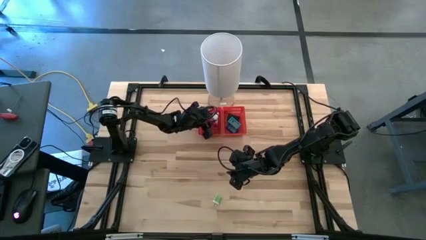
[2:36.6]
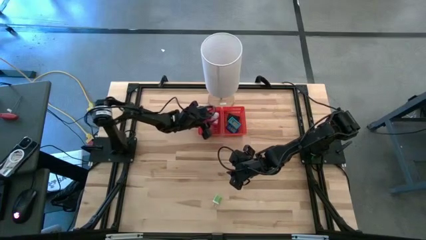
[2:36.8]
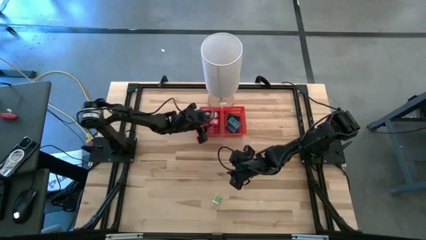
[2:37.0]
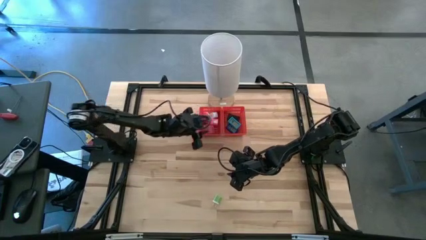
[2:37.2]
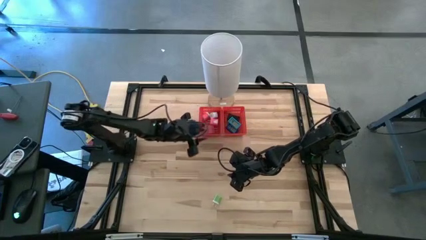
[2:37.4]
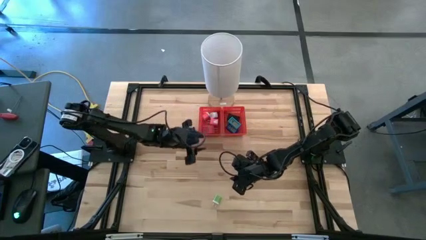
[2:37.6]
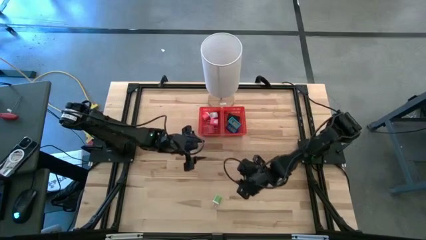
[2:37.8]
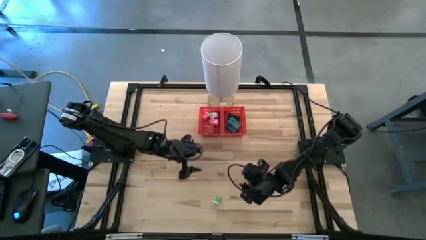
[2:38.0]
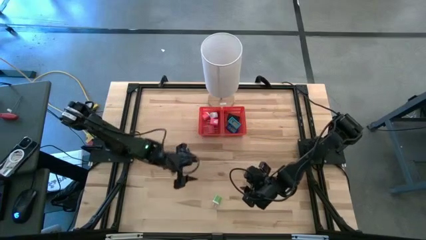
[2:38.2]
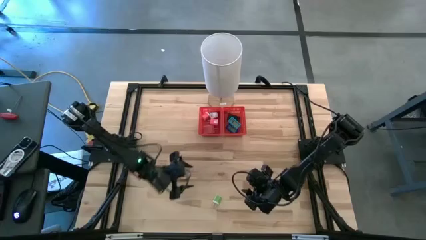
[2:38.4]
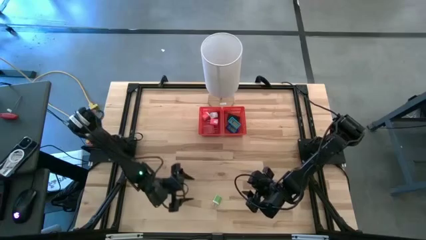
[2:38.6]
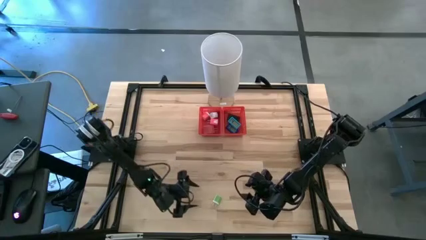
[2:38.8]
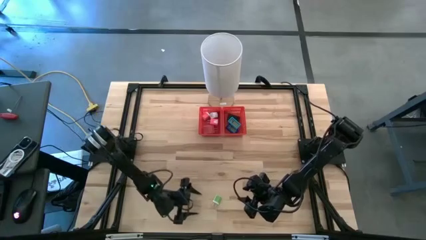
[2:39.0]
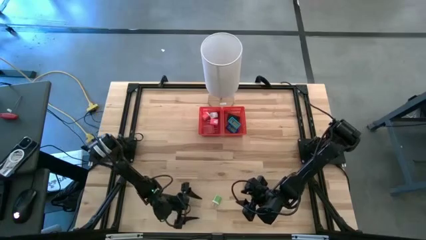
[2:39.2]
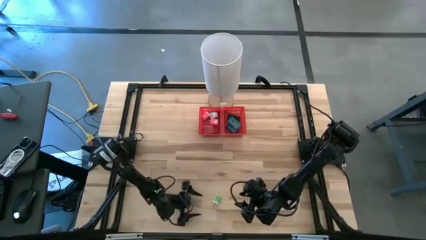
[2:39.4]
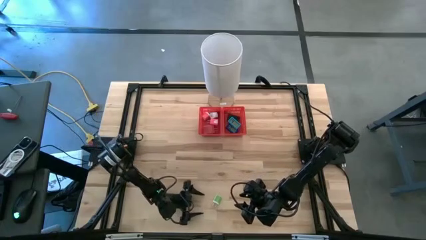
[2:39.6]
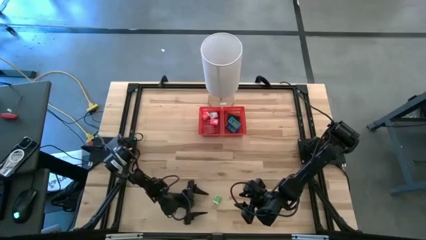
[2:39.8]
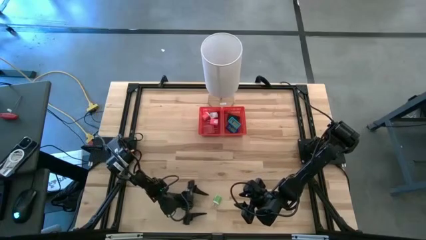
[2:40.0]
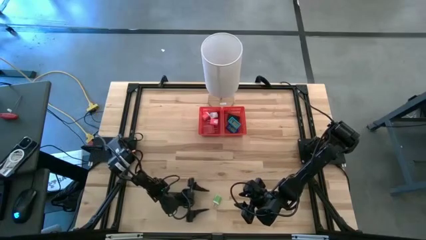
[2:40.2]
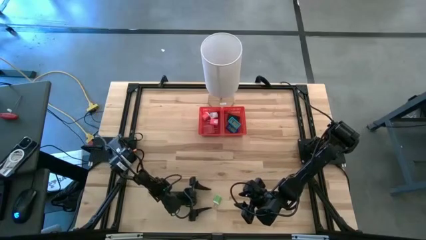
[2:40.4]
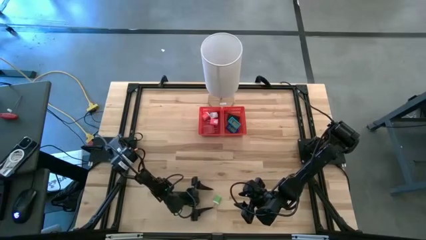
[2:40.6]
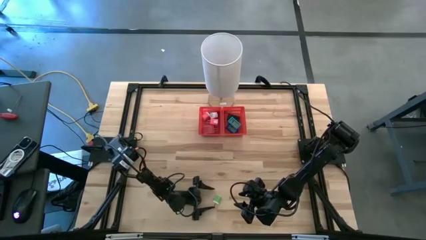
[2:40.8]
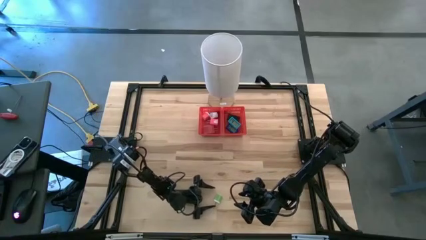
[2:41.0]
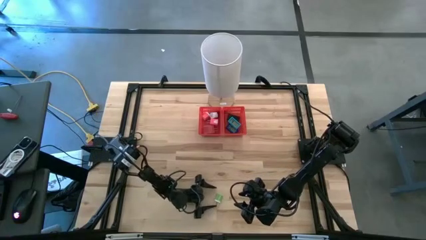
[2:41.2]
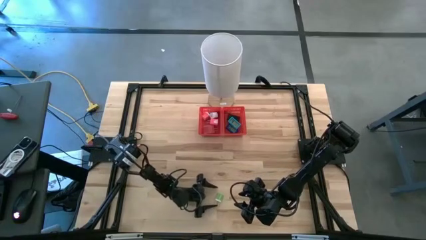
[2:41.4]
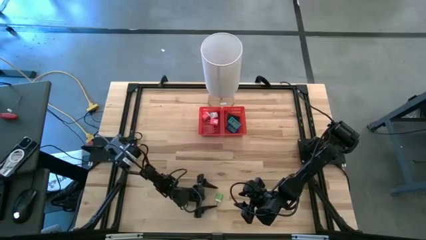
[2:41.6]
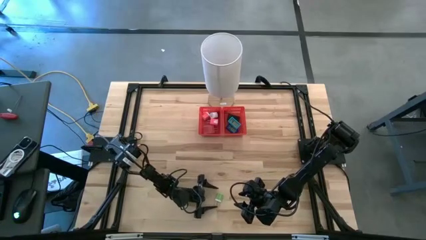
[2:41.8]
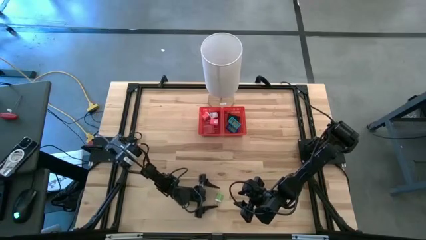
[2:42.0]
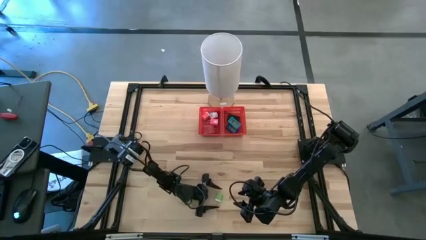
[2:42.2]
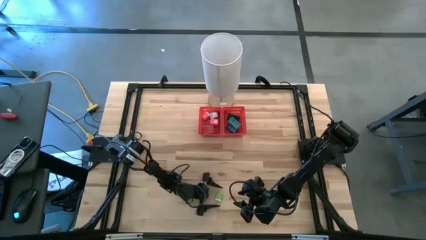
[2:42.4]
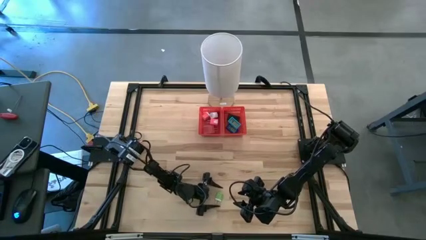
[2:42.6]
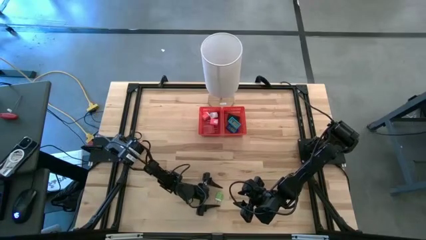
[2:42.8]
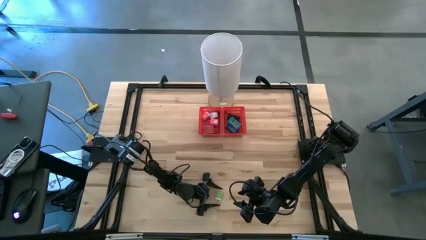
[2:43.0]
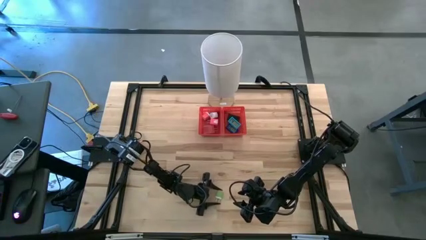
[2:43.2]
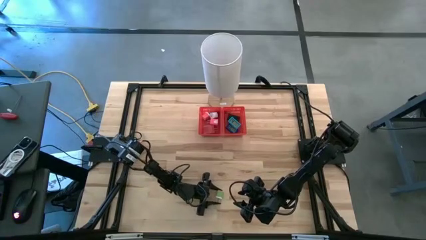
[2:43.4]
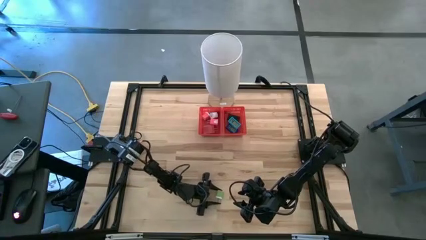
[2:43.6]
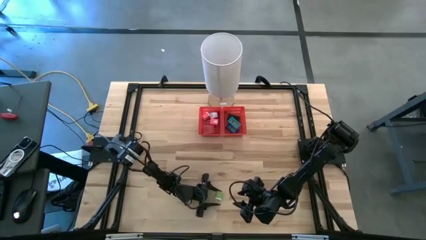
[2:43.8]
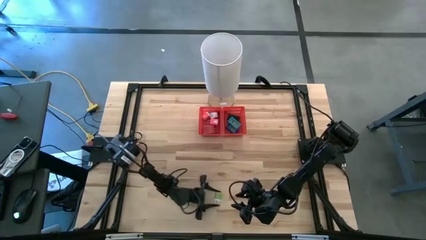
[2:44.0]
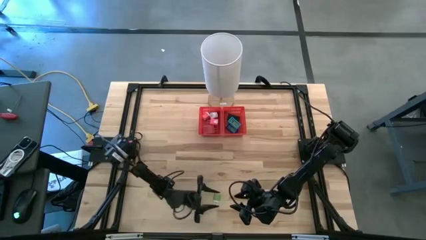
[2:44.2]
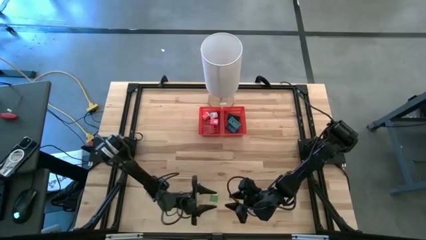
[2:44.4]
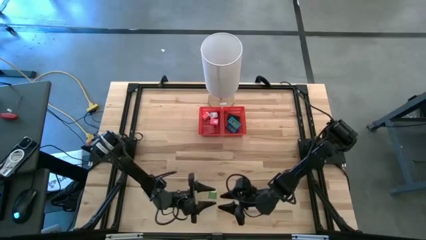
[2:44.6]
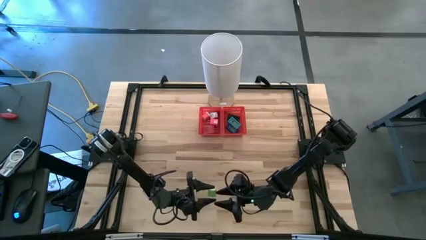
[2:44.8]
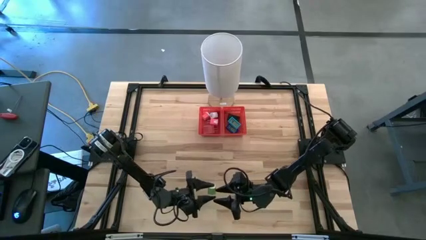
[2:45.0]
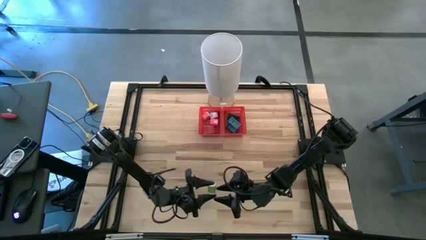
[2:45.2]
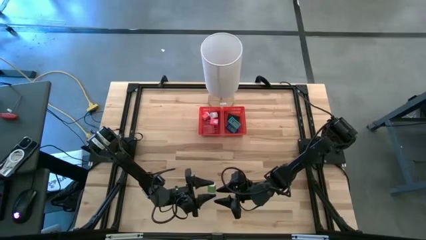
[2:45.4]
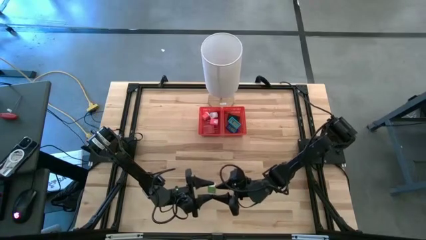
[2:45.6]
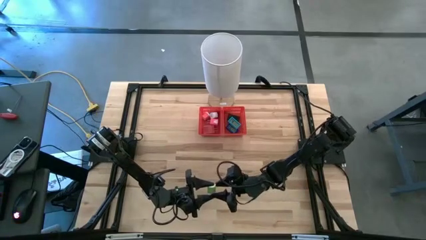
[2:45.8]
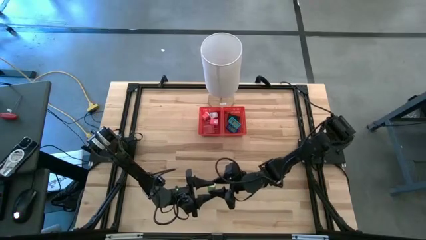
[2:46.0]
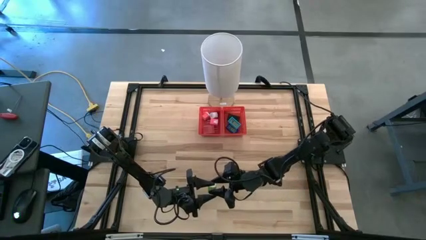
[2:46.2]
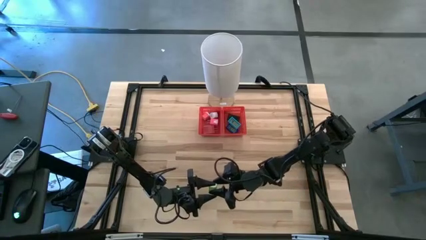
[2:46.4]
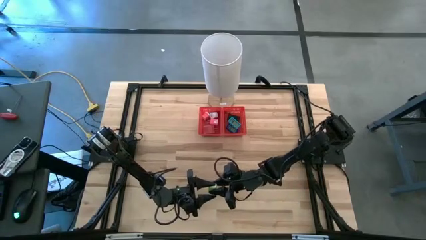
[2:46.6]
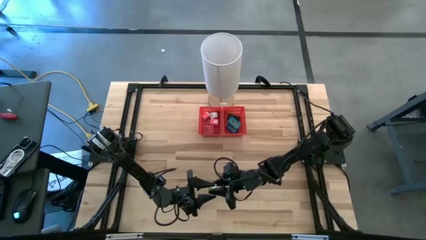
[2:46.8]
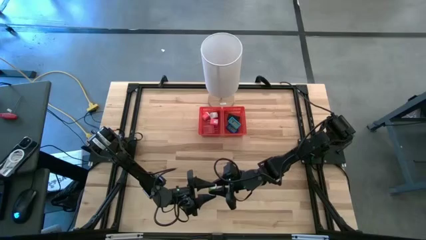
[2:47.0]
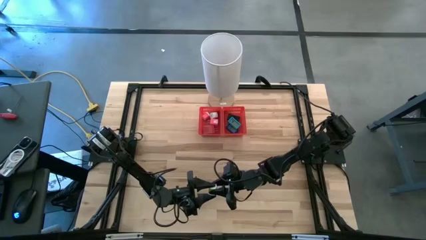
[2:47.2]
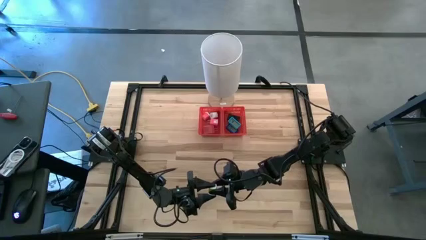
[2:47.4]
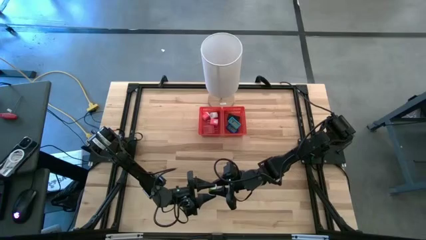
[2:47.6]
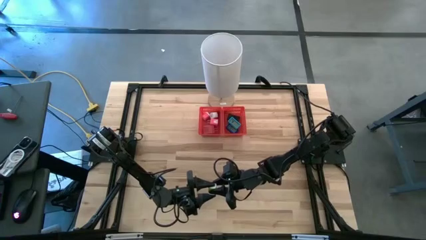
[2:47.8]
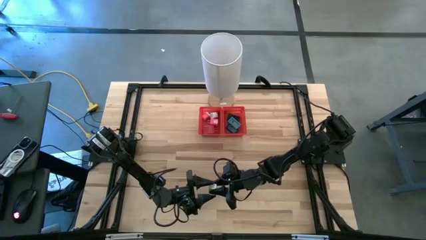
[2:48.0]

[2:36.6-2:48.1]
Task: Pick & Place Office items
Put the green charger adapter into the left red bin

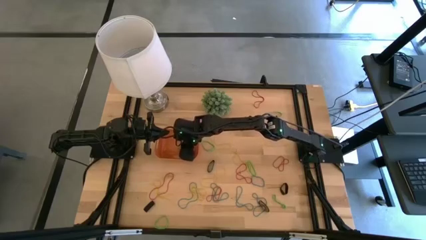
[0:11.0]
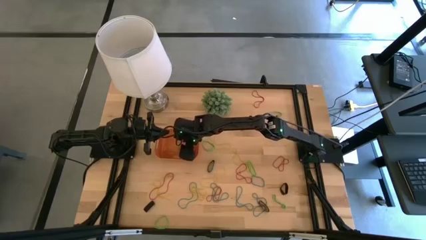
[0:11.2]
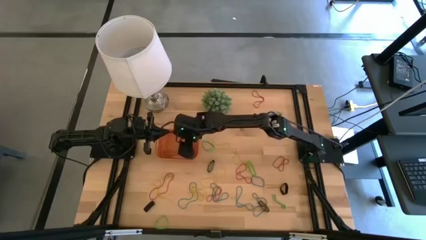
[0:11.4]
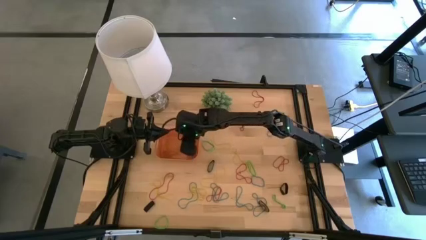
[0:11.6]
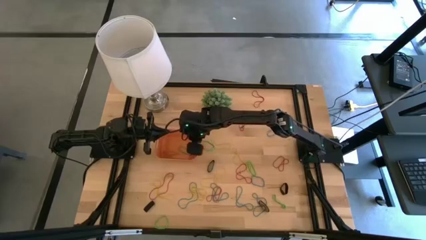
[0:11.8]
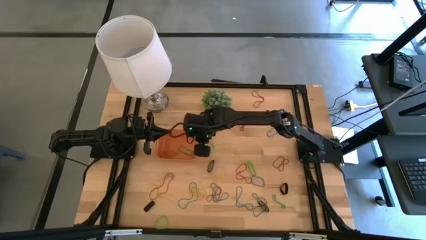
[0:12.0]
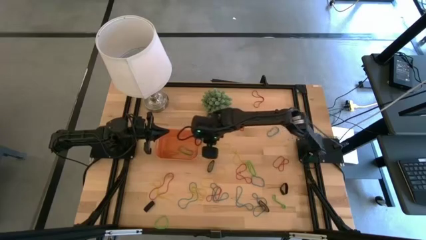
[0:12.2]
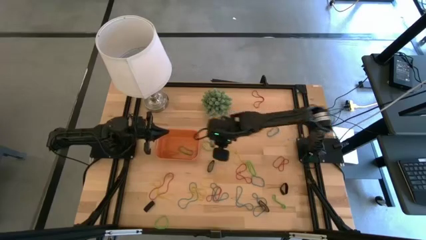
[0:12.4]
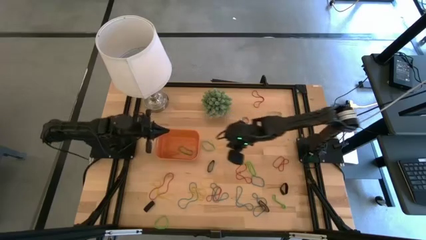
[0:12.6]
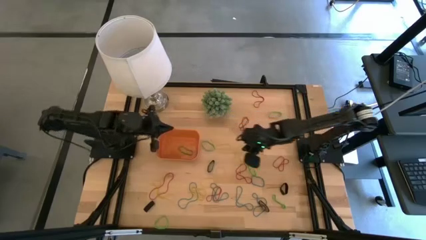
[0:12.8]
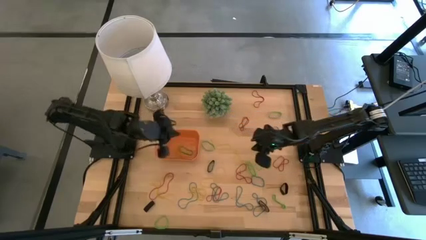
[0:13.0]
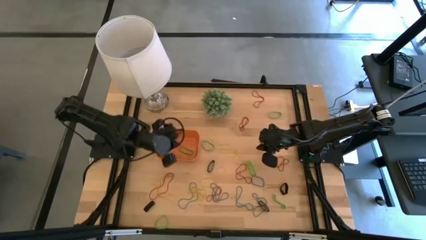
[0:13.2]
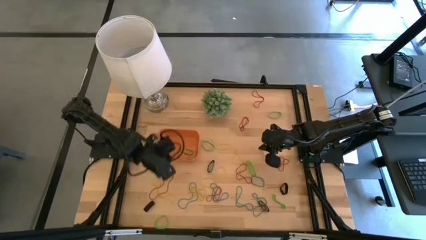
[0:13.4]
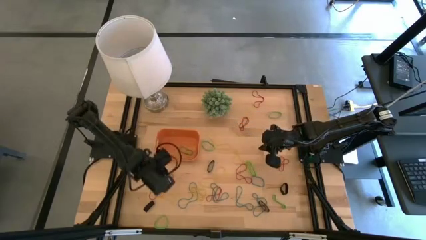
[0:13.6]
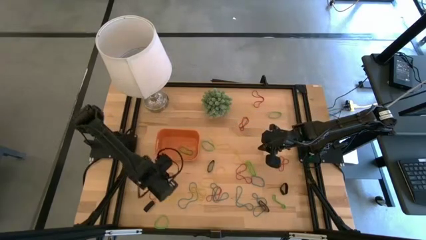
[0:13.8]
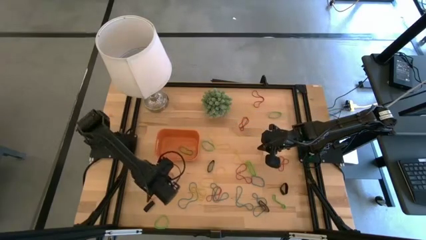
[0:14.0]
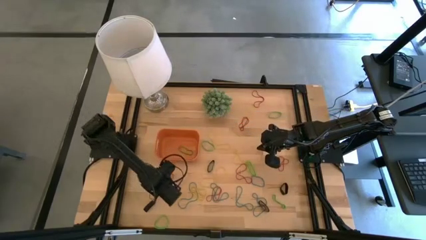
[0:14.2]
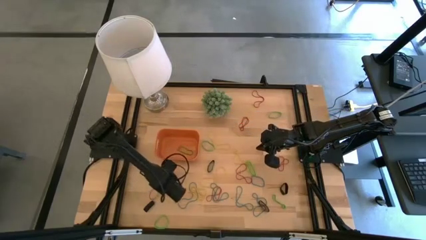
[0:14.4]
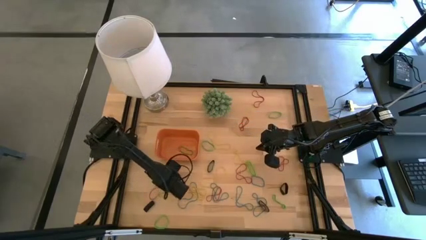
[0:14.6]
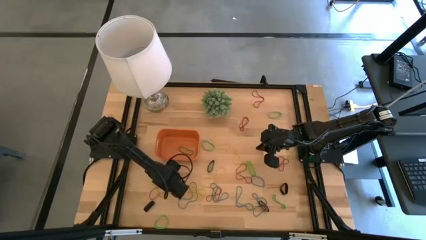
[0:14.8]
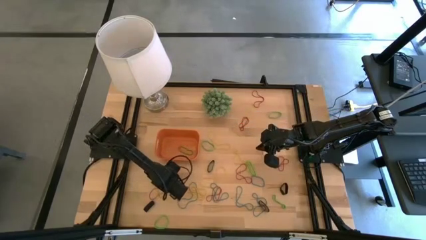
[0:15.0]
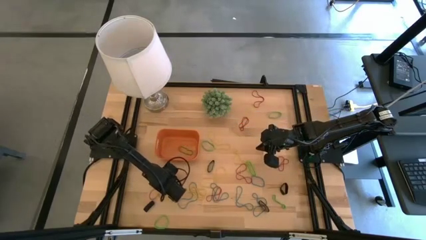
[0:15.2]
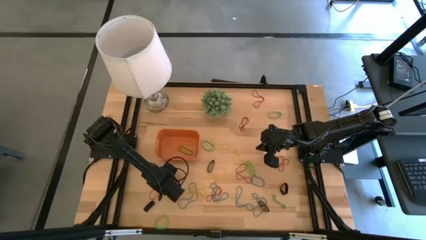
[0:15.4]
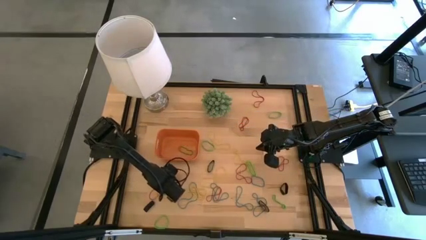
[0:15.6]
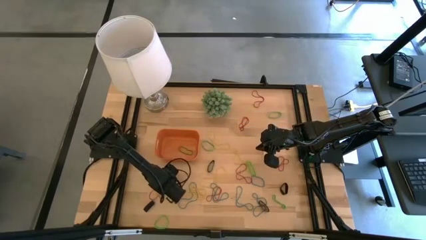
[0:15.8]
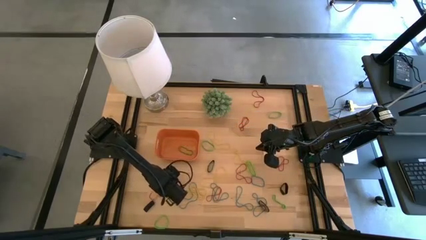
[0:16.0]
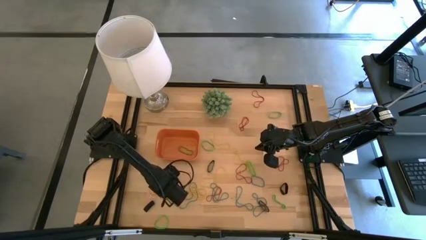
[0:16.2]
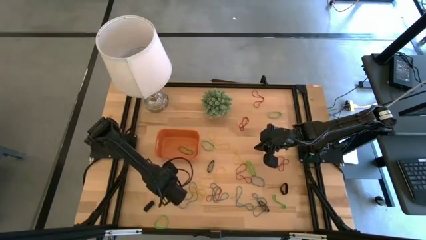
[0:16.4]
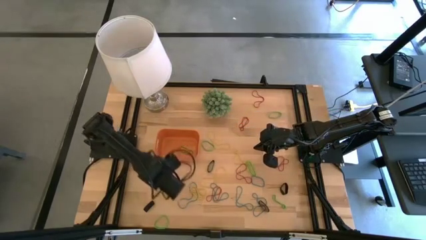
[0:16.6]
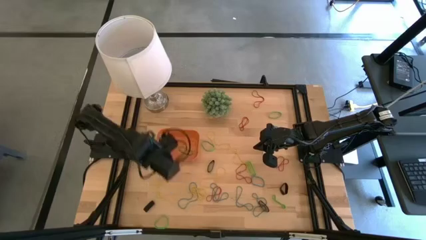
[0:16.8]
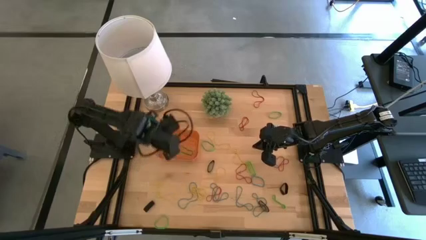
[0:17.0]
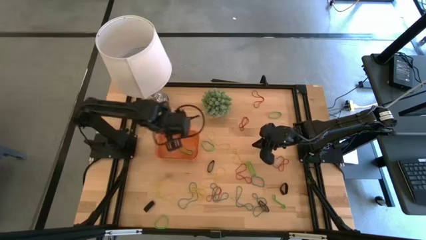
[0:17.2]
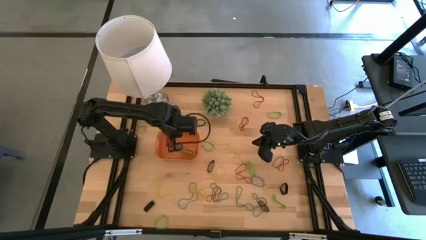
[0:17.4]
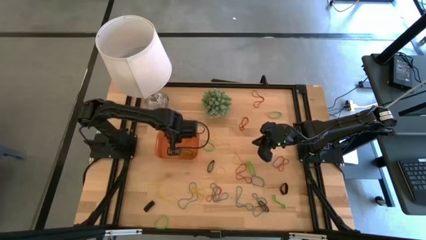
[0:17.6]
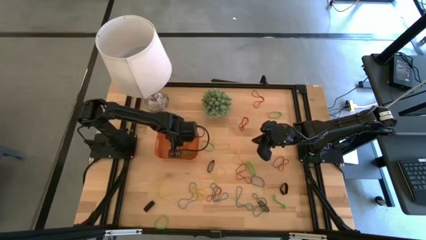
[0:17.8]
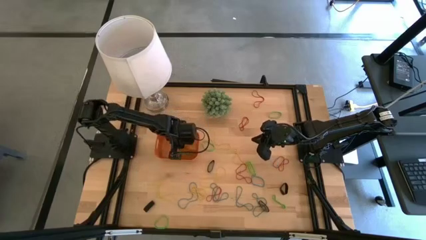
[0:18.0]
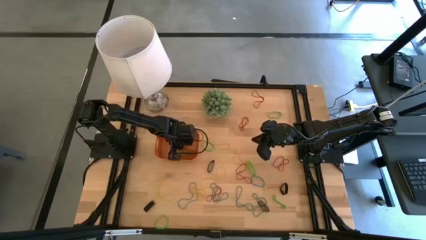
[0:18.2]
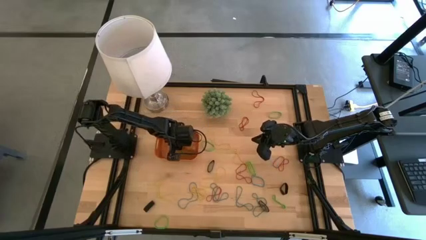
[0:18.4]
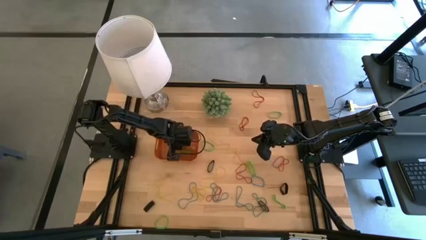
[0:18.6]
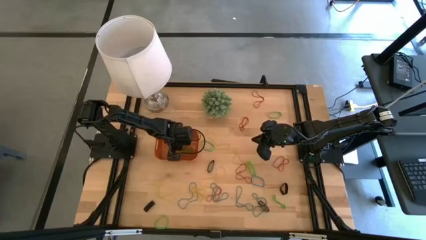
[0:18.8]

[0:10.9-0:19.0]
Task: Pick and place rubber bands into bin
Put the red rubber band into the orange bin
